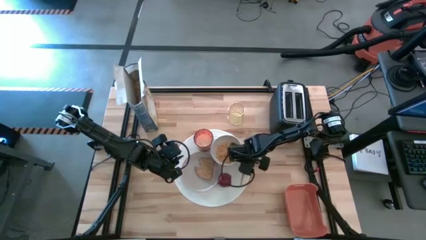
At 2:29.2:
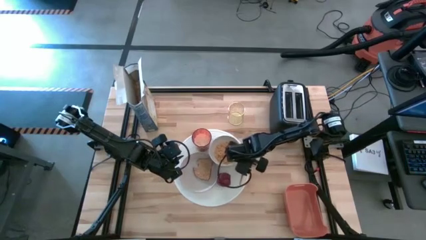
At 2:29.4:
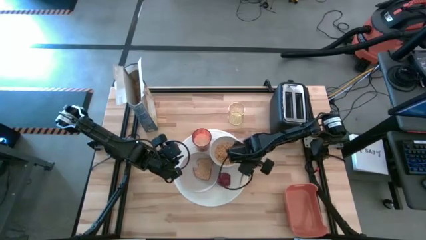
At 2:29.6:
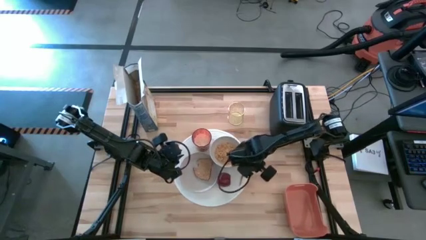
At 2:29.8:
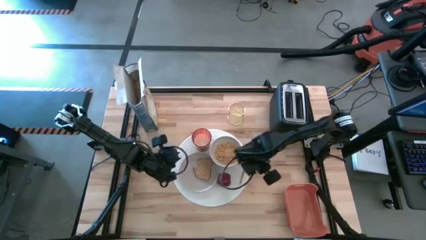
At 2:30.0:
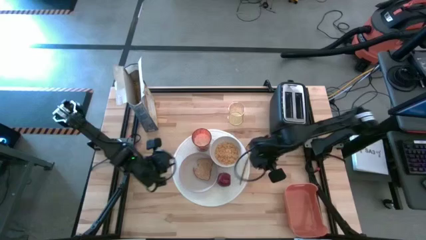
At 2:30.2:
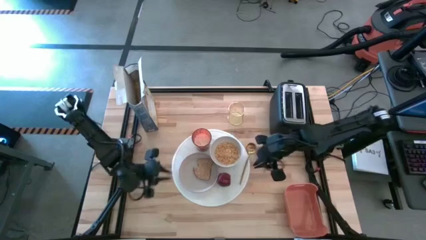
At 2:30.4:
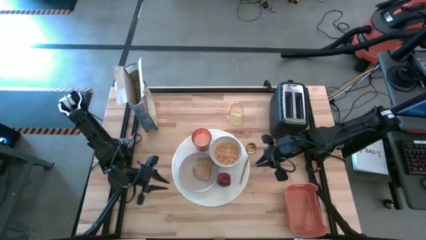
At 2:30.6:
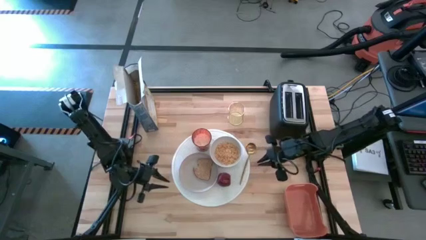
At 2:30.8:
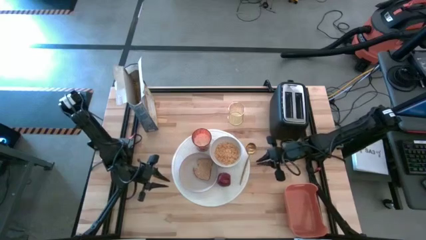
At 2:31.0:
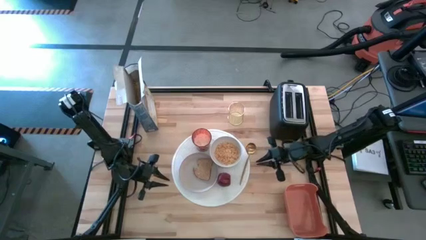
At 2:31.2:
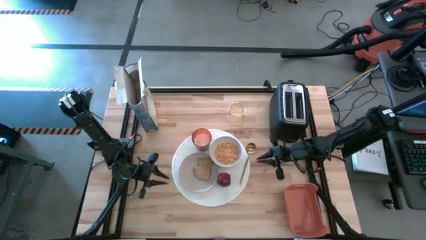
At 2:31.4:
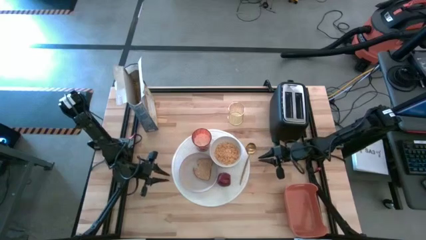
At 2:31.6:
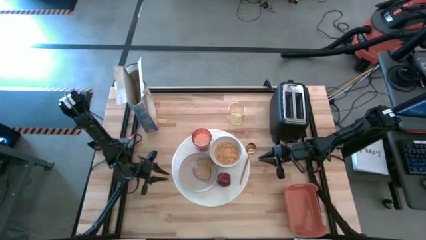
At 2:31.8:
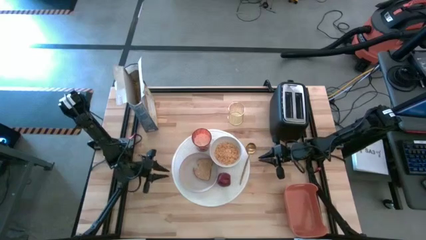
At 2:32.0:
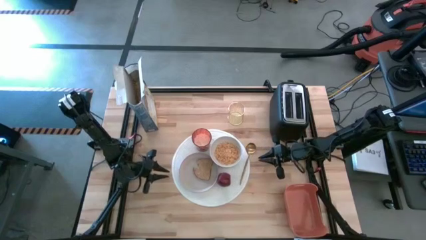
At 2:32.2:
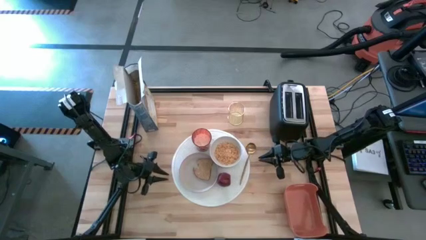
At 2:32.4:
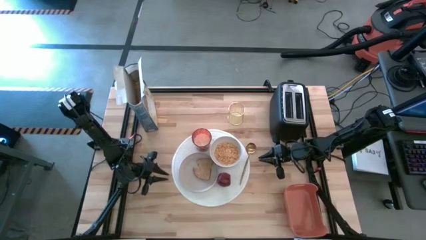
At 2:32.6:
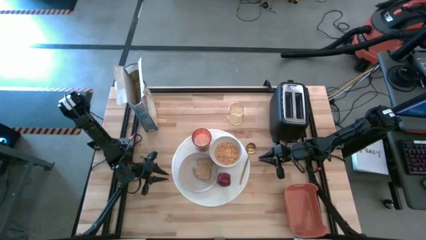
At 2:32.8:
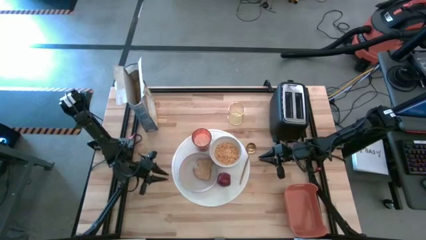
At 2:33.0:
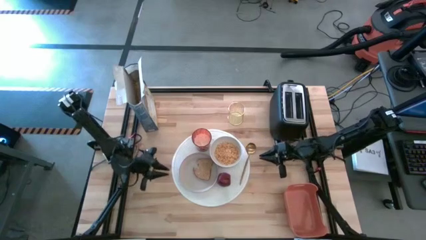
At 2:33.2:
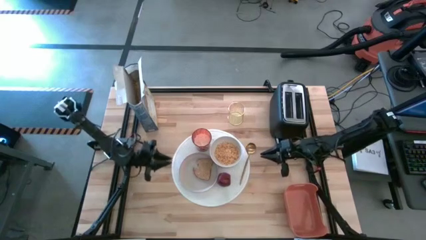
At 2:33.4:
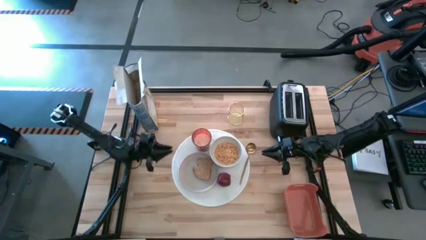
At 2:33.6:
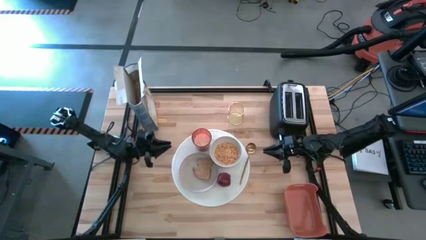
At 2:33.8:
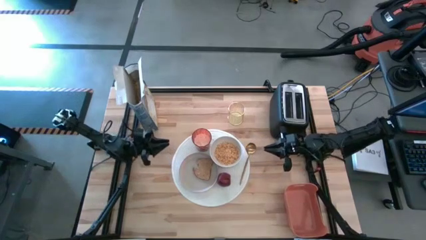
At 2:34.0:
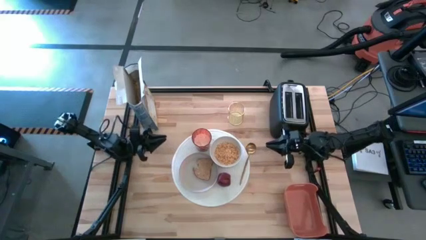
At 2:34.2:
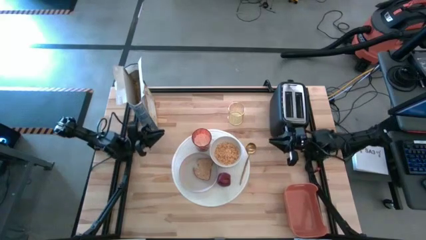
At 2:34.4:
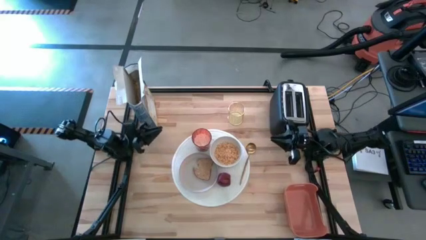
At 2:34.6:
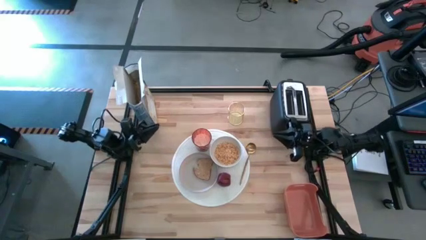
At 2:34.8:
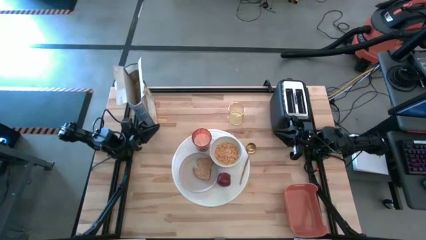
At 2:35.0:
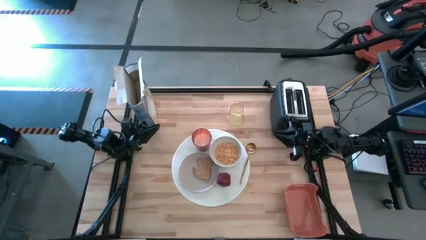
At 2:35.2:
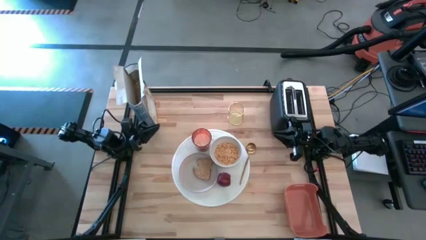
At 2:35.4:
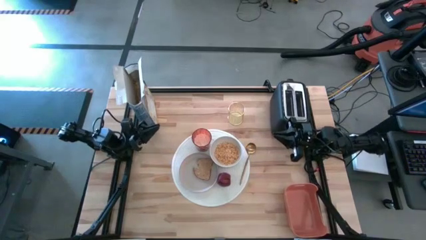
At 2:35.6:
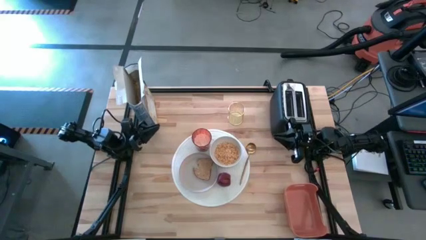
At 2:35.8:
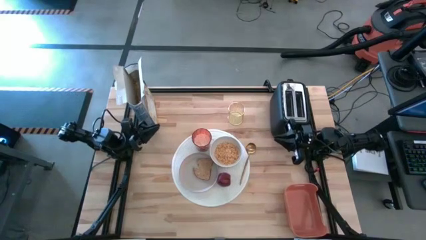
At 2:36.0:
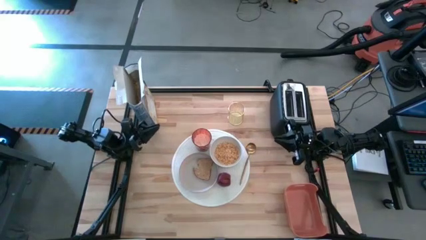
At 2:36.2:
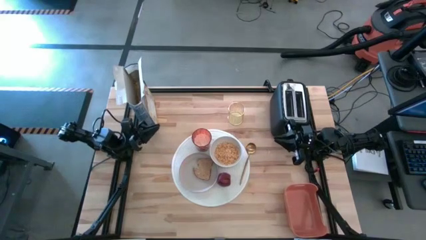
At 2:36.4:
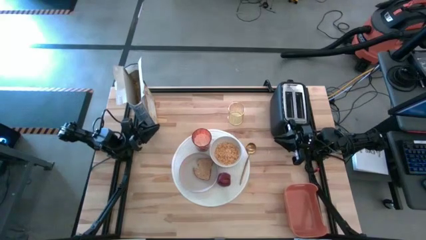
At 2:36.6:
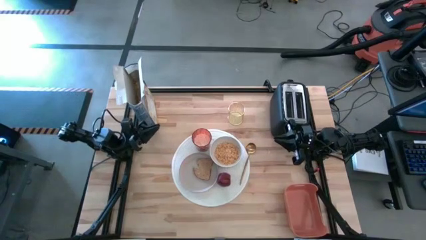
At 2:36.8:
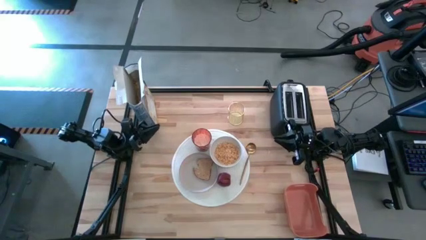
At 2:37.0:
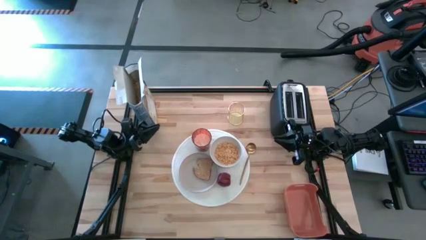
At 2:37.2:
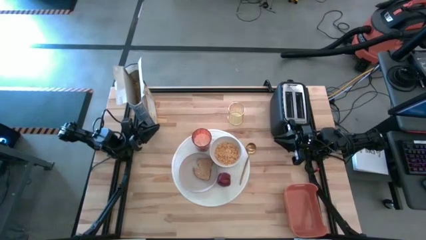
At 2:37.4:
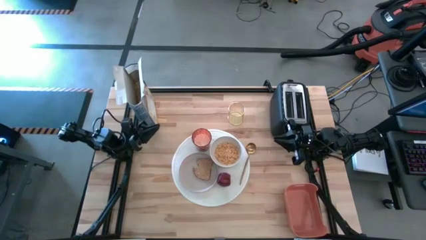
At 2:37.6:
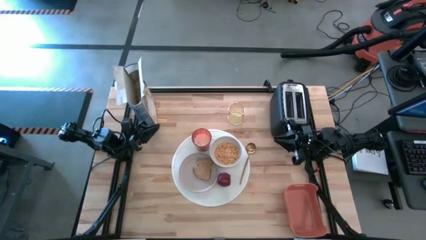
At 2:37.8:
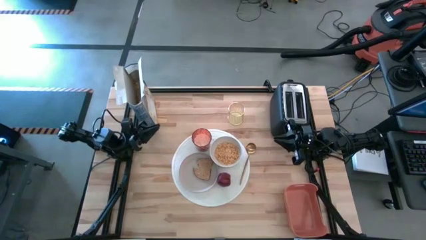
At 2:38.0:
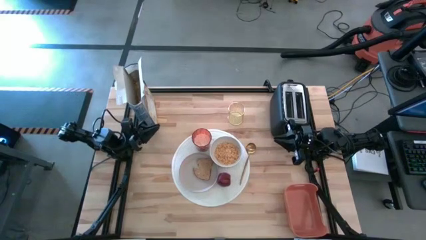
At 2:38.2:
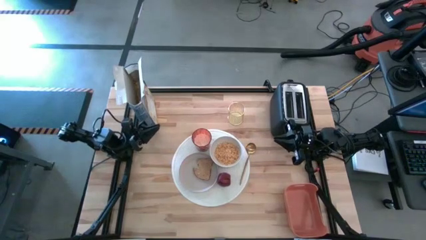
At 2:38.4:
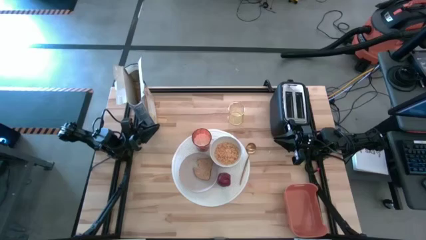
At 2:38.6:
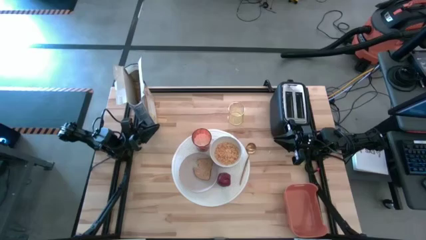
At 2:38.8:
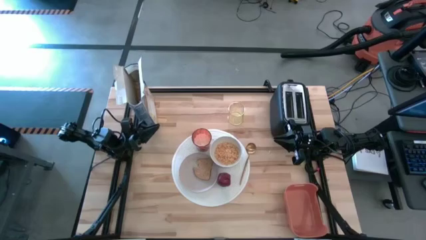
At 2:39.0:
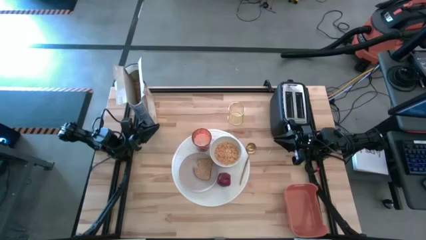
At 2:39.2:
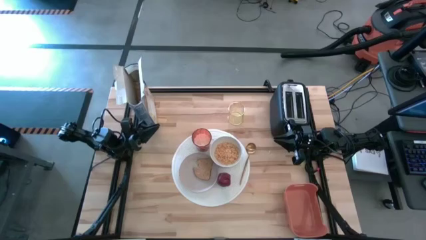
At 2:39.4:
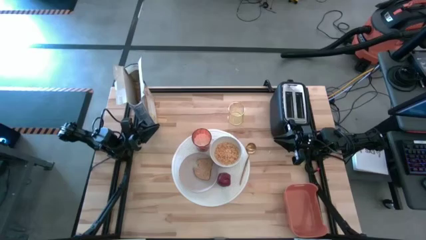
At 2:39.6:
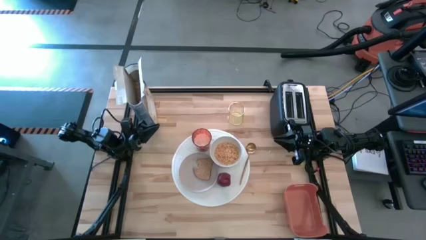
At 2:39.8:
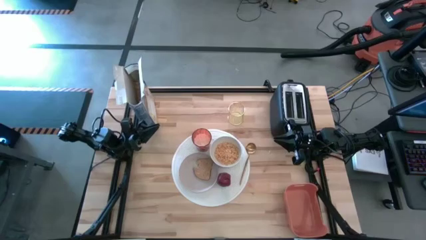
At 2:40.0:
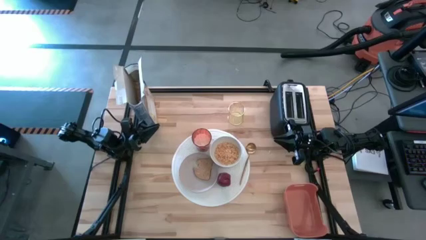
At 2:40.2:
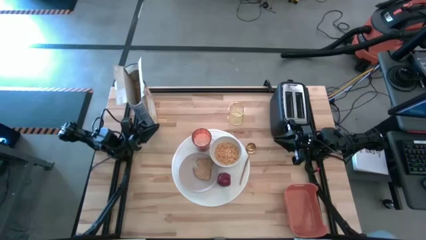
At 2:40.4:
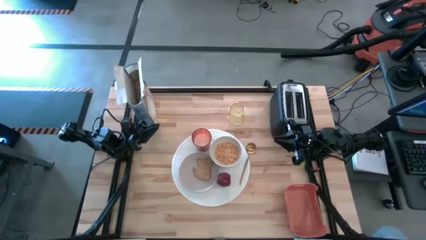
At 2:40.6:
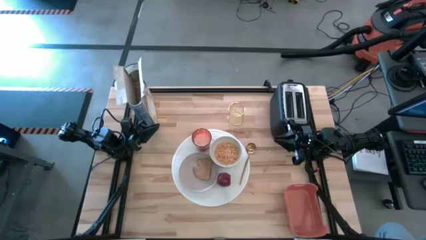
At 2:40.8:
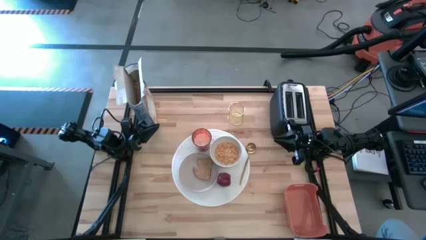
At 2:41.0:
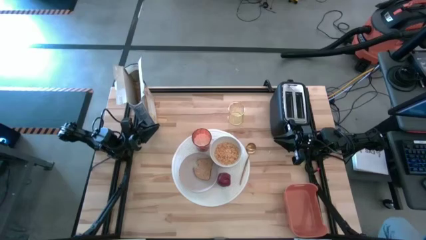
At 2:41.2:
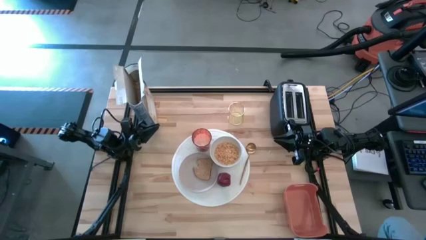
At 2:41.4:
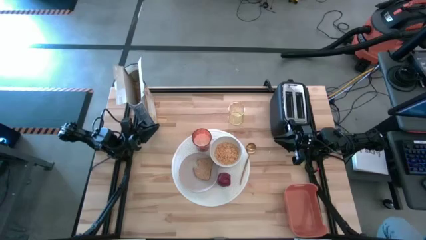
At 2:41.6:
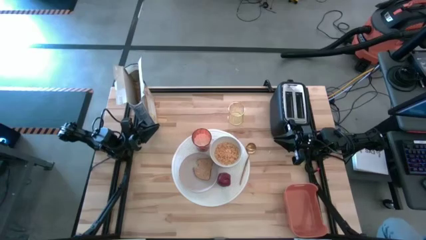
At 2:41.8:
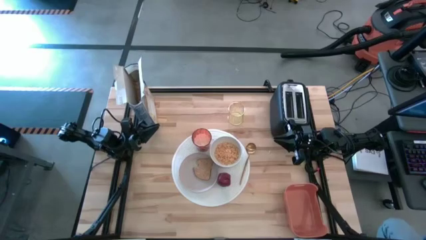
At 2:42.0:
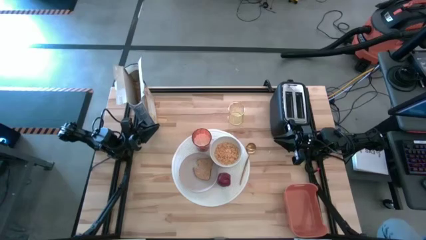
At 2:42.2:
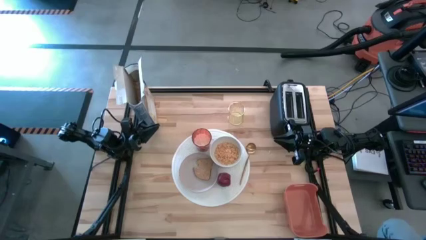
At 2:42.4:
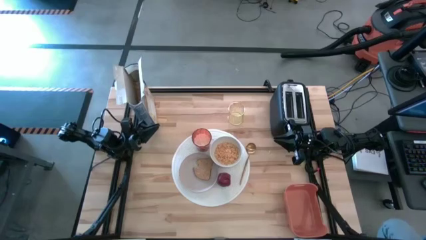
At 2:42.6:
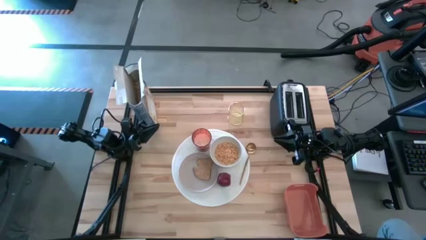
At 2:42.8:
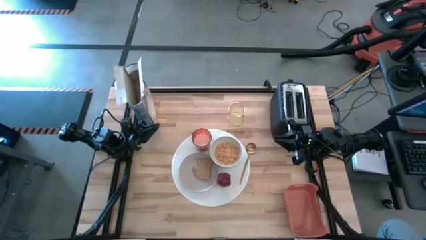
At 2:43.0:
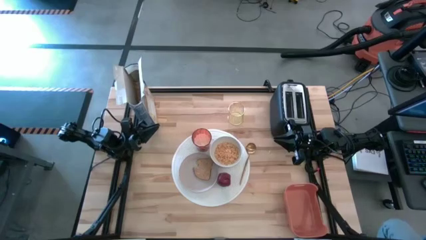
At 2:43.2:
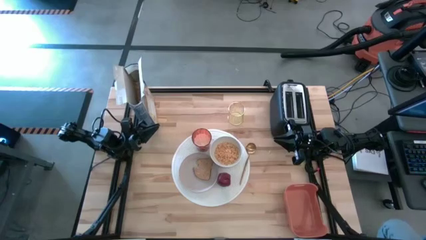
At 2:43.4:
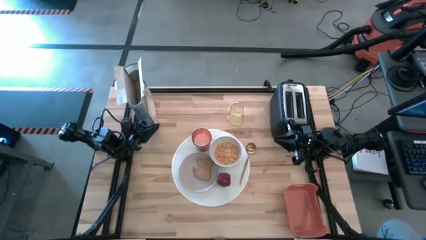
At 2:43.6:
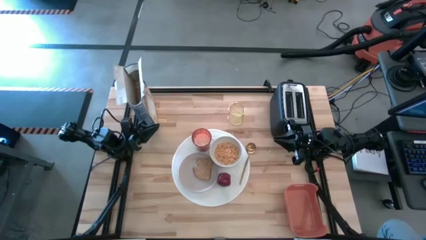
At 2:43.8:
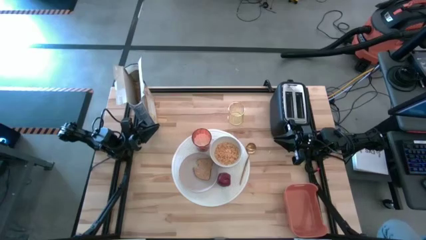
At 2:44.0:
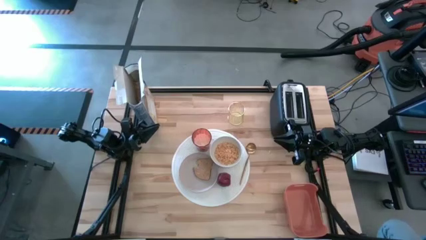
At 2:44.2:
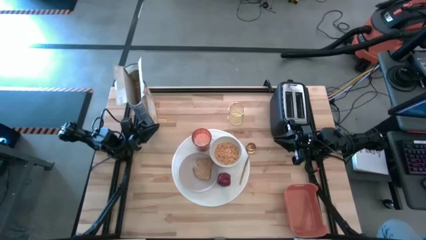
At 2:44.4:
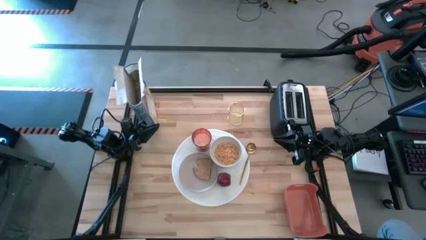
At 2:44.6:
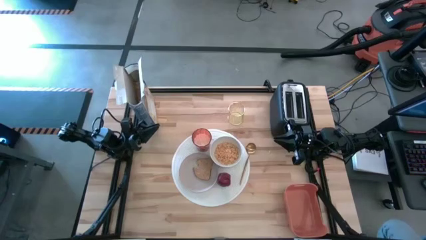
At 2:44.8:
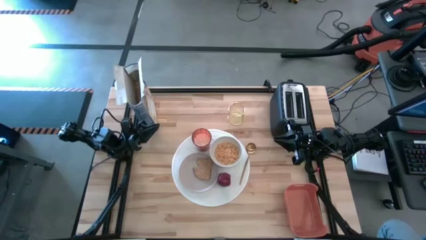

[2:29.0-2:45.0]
Task: Arrange a breakfast setting
Return to Home Position
